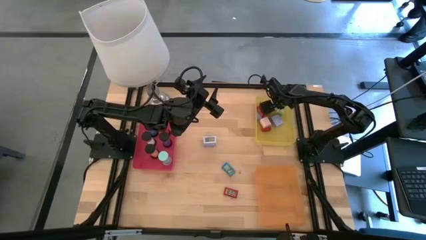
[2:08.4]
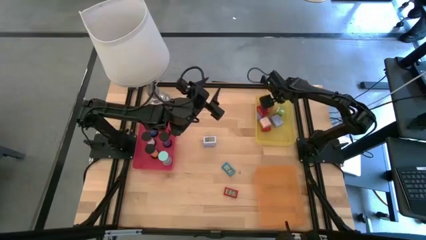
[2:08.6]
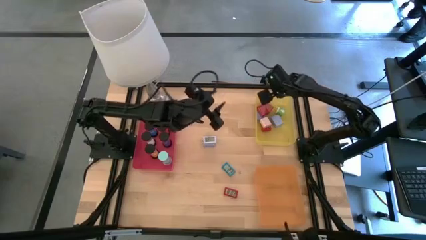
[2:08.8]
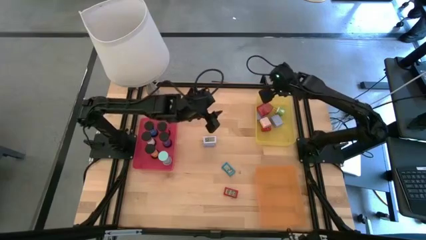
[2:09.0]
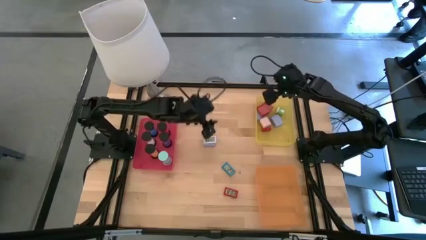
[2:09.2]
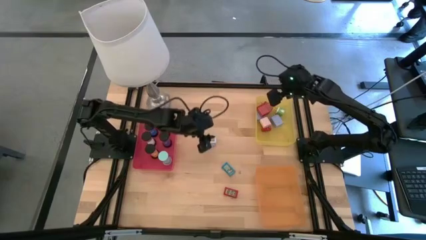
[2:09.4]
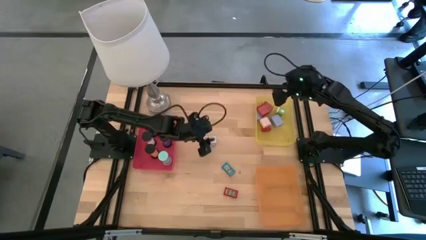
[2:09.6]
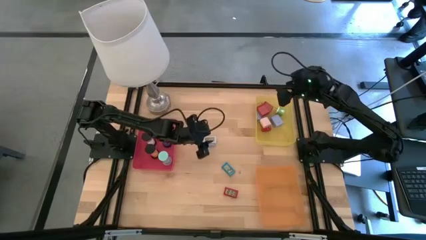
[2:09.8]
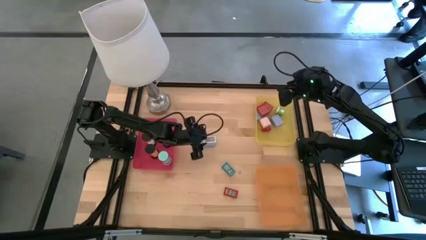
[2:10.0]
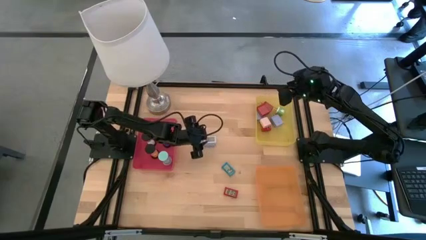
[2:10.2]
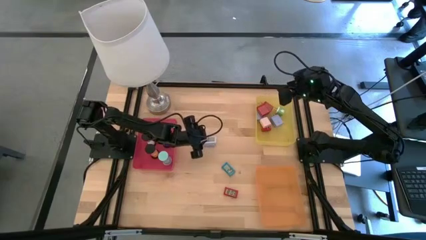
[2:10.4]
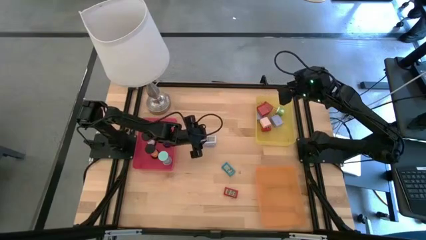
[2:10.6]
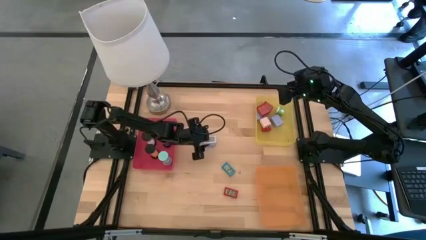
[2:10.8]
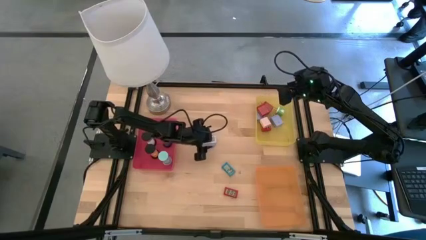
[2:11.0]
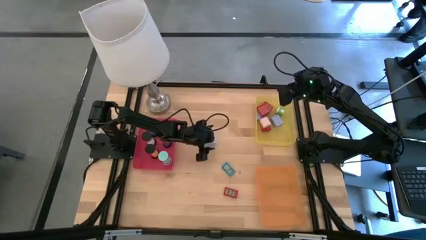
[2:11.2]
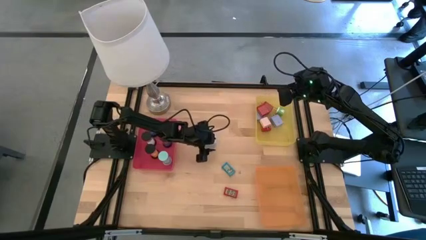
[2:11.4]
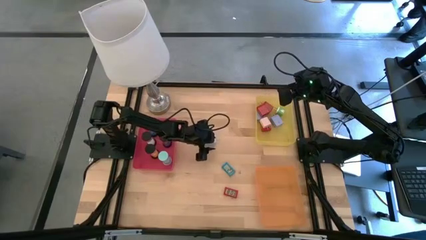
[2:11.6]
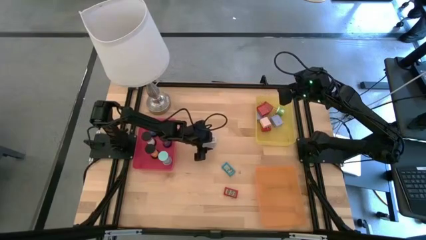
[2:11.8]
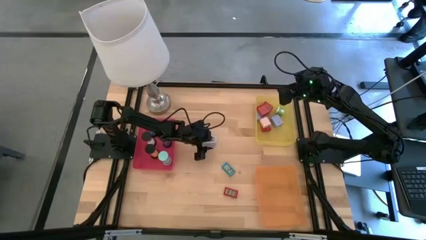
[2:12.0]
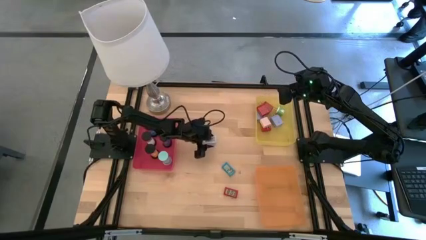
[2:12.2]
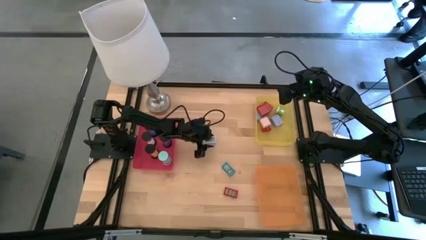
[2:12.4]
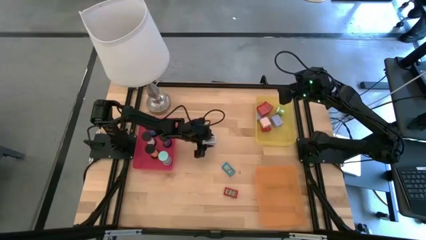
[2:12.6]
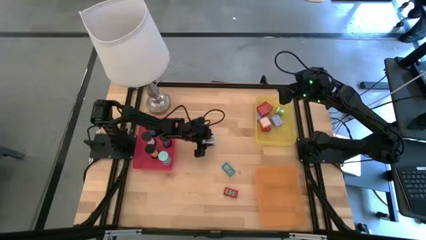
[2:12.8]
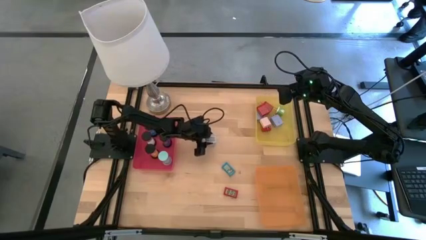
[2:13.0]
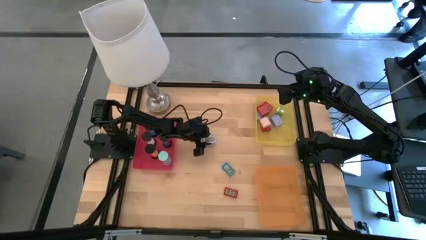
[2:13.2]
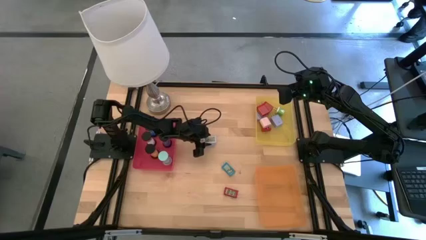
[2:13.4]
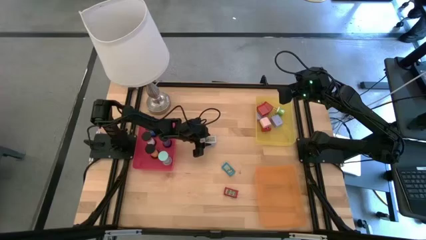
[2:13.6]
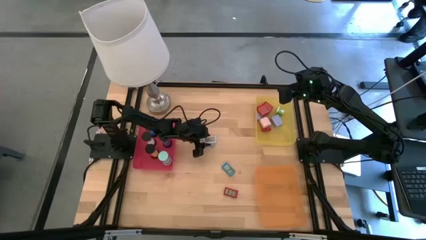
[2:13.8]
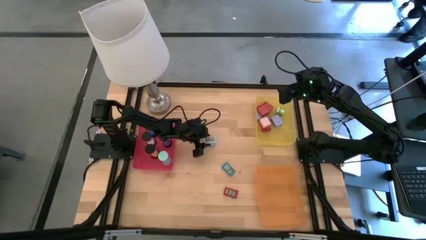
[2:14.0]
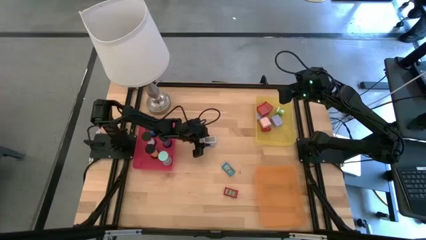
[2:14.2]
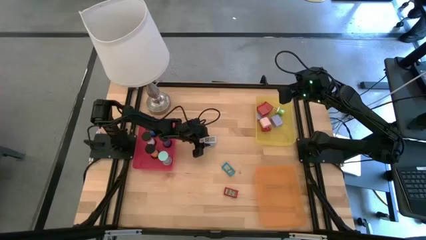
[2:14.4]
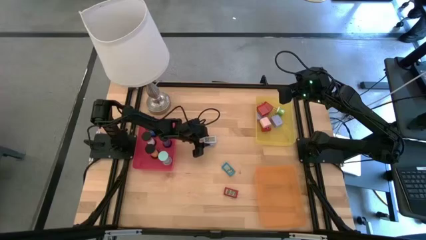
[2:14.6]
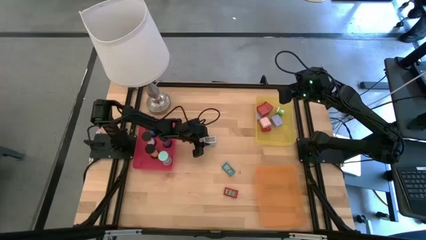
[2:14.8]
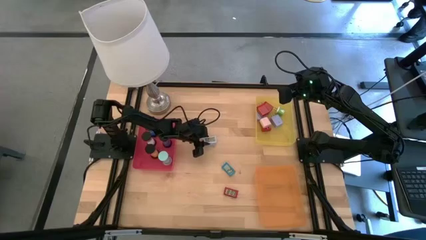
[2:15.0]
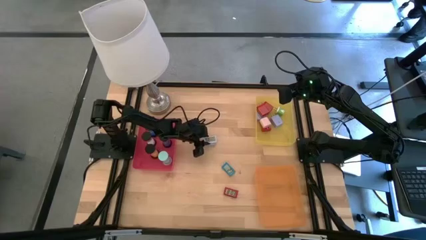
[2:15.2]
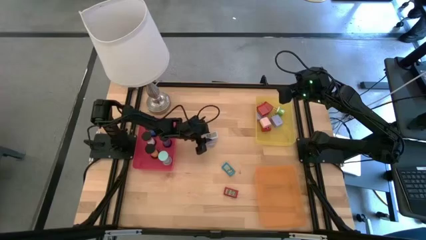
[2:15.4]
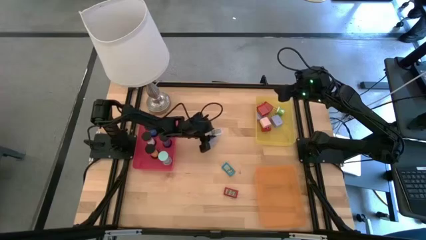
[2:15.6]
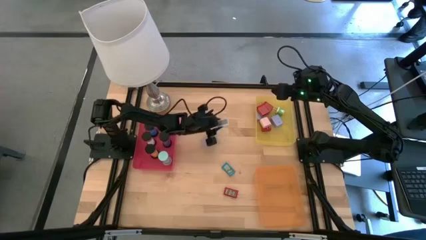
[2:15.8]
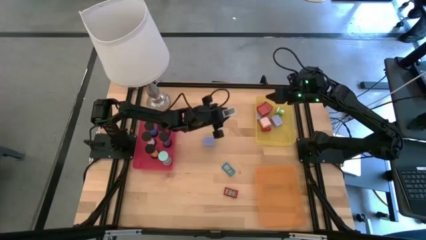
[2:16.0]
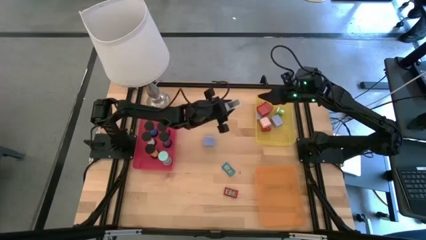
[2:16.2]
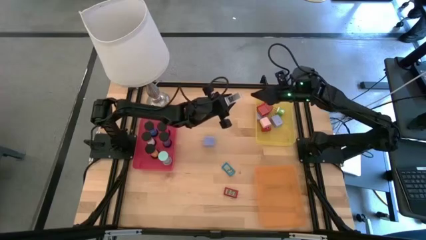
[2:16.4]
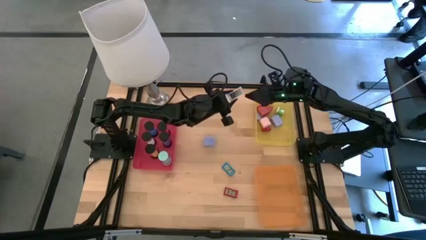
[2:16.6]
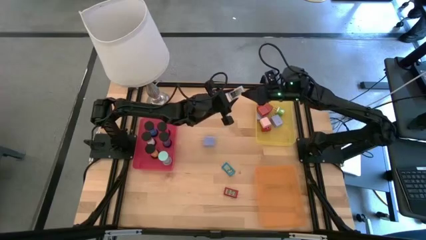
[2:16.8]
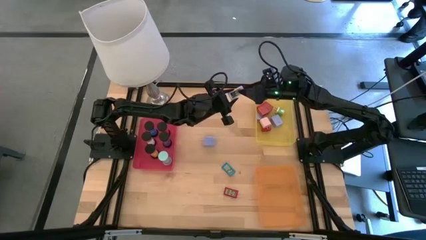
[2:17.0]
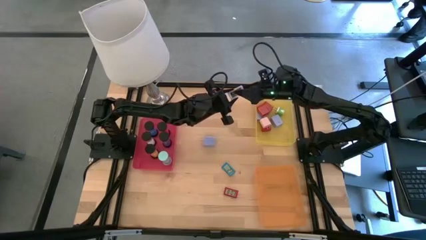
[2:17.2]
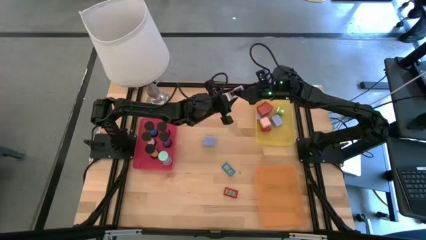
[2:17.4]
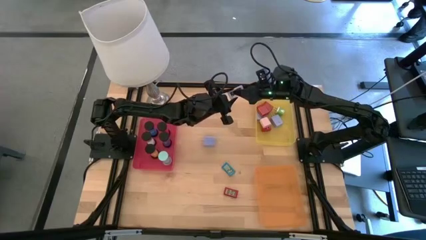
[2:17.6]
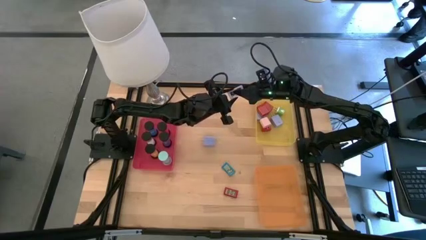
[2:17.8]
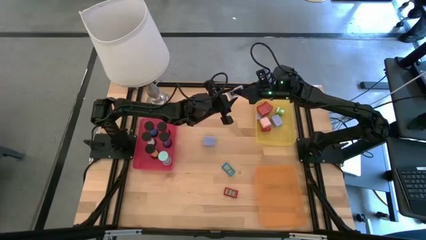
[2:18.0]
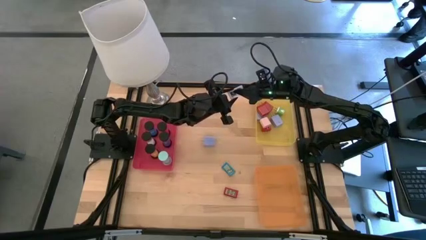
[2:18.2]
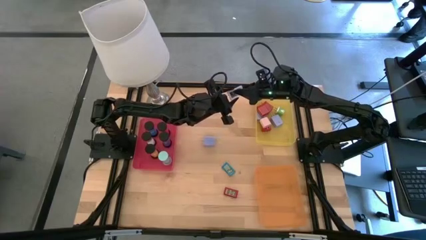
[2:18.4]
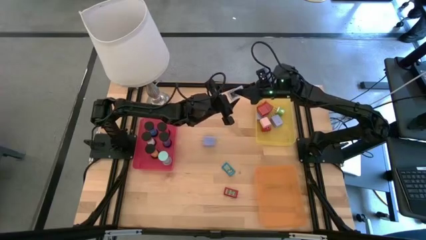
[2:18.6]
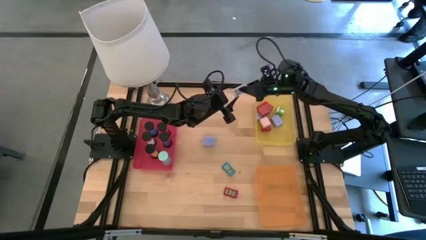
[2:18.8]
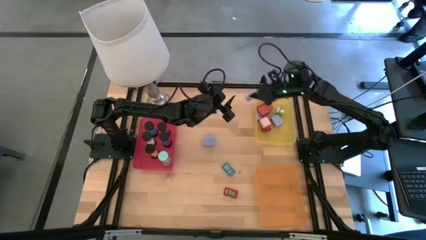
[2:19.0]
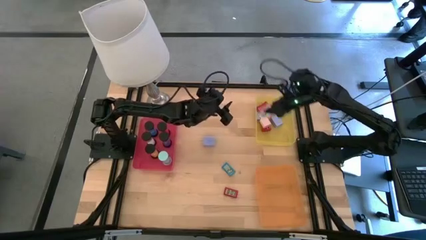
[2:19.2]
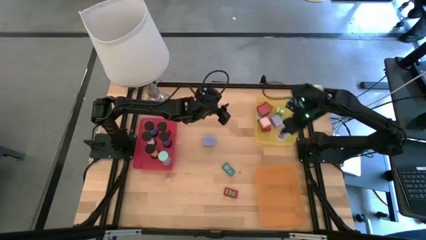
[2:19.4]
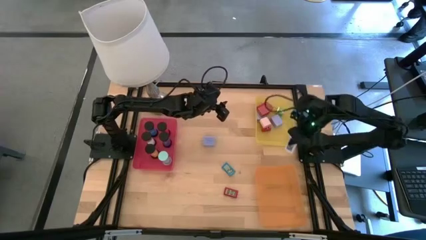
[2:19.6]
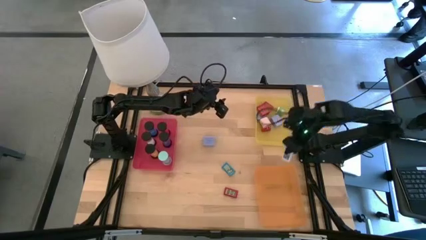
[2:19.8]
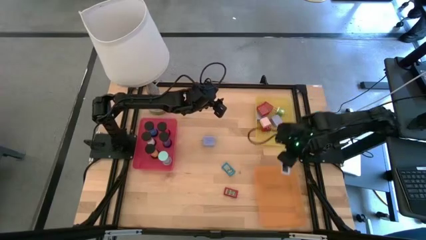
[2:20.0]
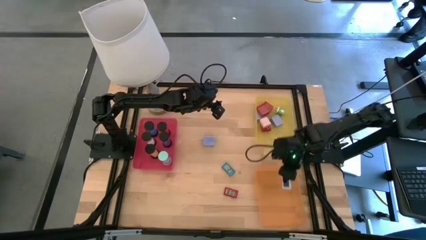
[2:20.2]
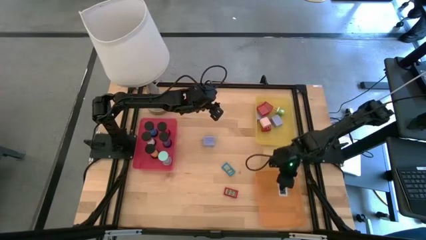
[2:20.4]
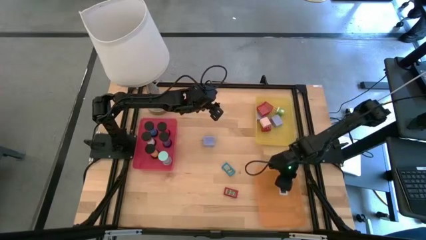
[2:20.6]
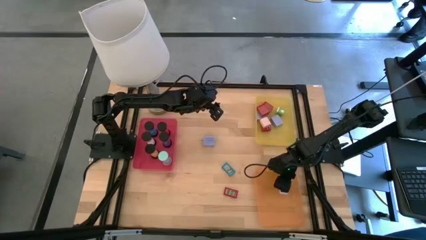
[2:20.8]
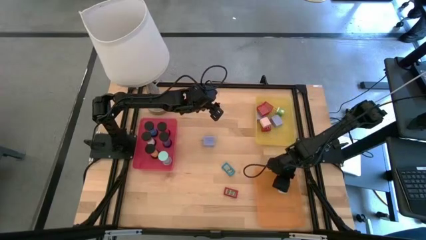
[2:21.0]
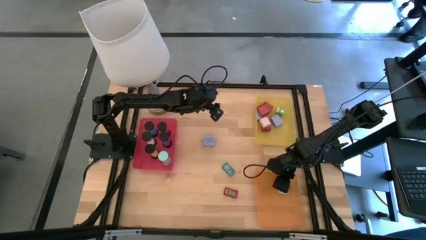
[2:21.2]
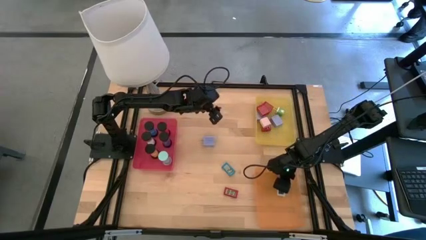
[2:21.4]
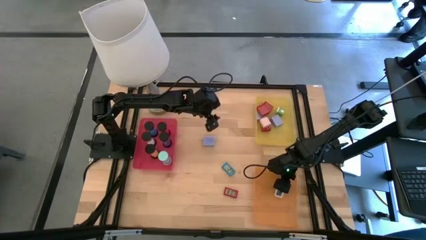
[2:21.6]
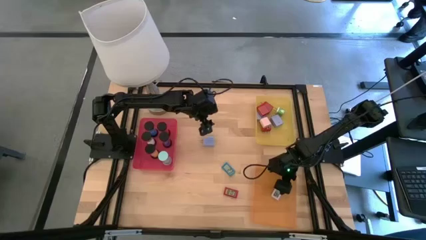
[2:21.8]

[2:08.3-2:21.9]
Task: Pick & Place Office items
Put the white digital clock into the orange bin
